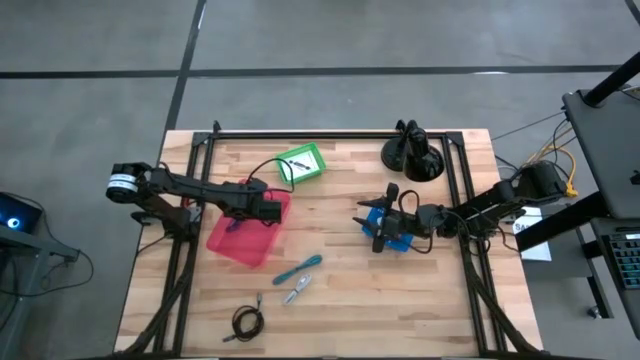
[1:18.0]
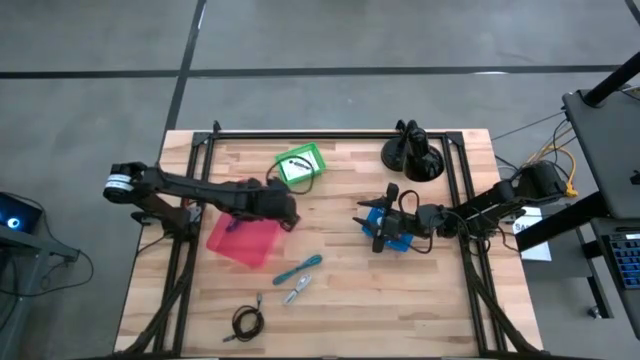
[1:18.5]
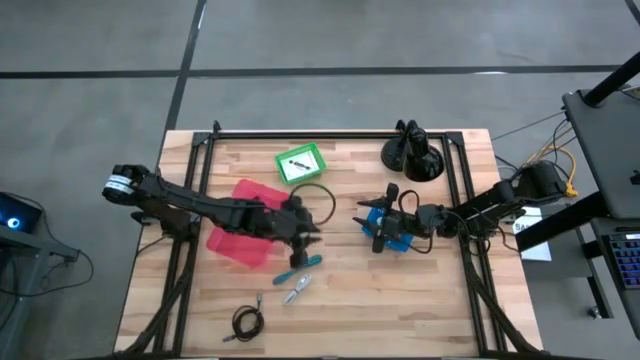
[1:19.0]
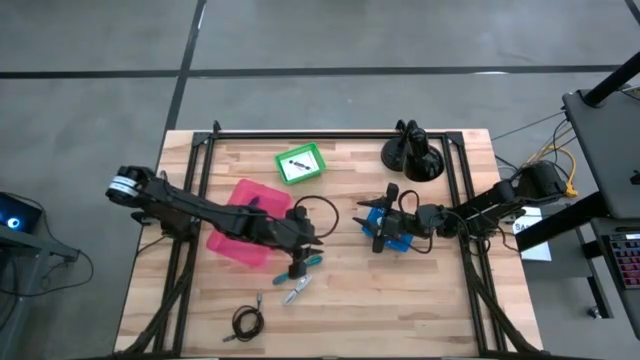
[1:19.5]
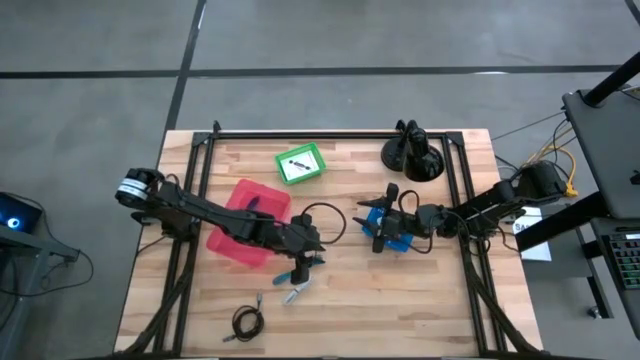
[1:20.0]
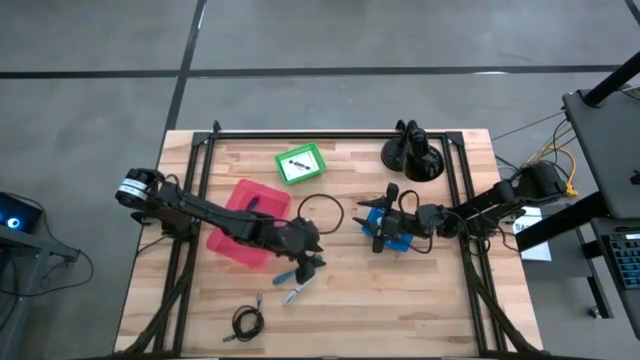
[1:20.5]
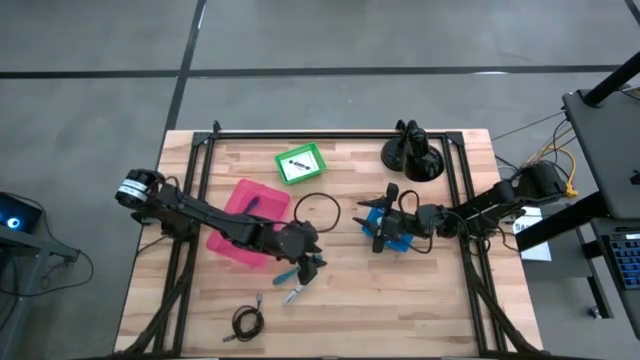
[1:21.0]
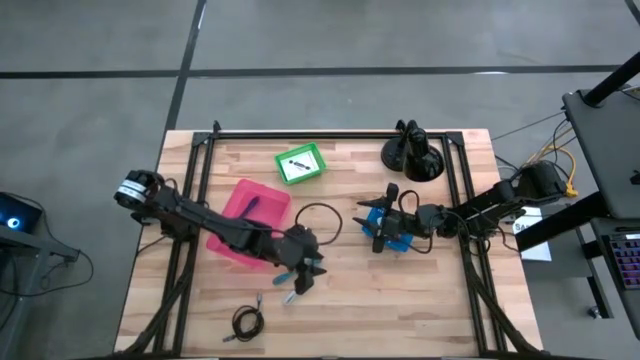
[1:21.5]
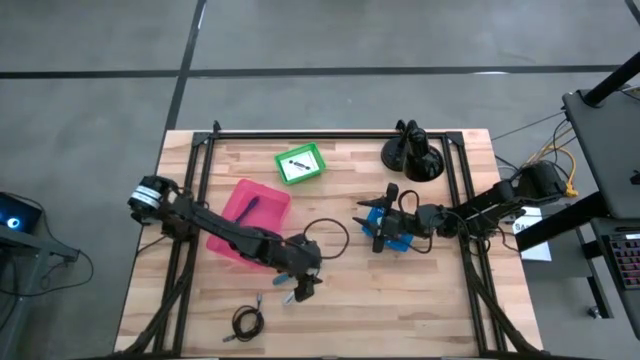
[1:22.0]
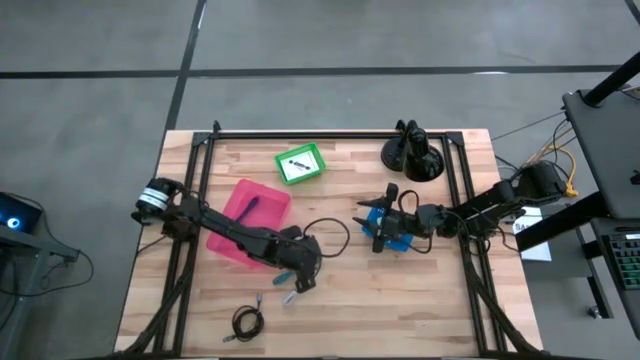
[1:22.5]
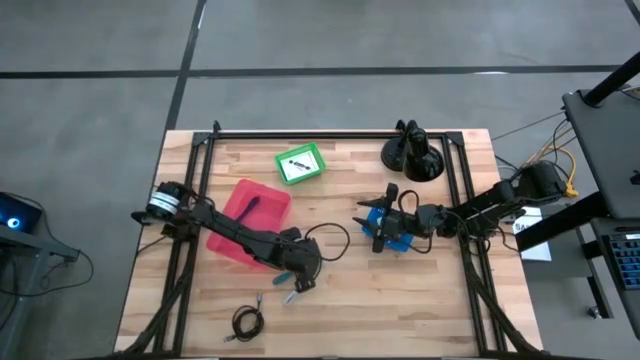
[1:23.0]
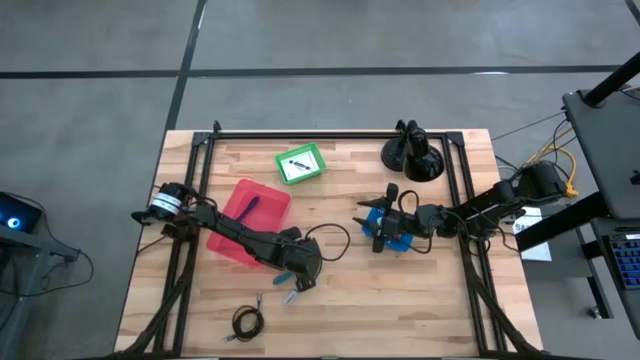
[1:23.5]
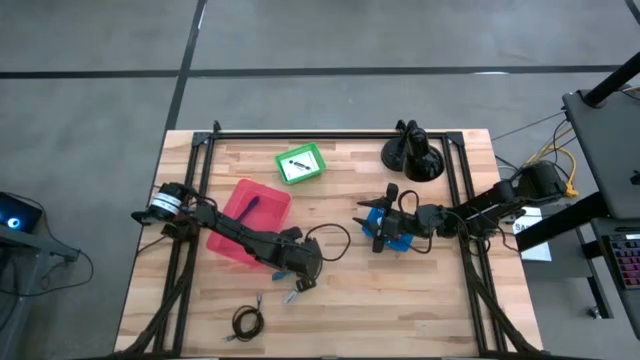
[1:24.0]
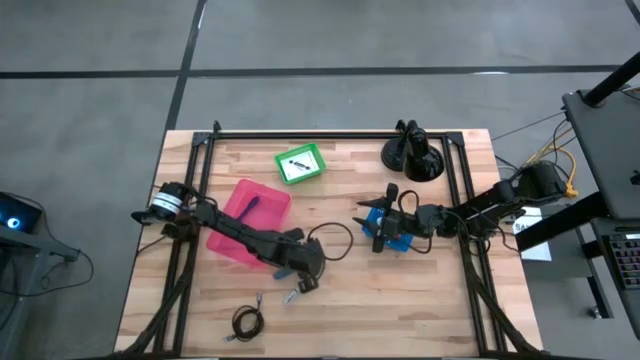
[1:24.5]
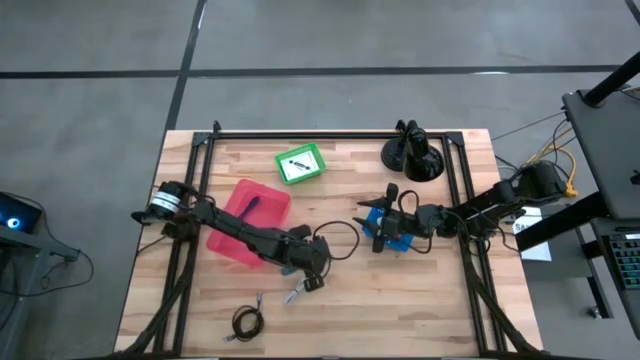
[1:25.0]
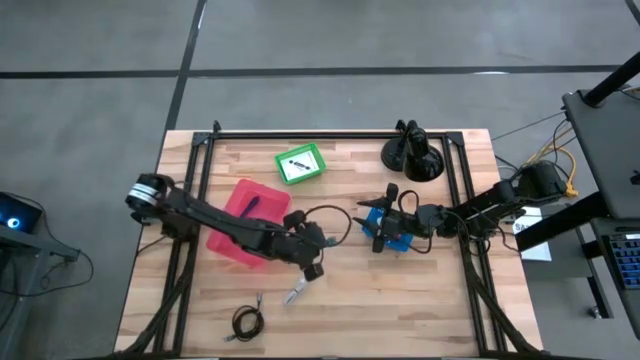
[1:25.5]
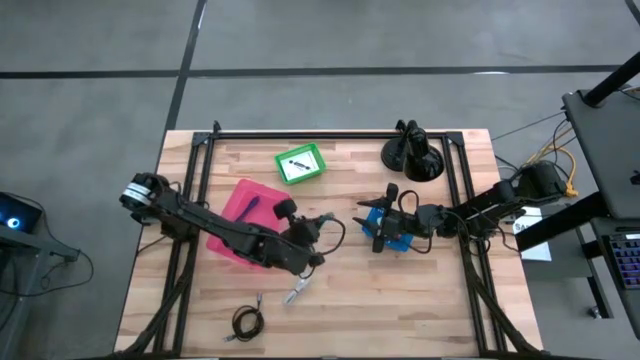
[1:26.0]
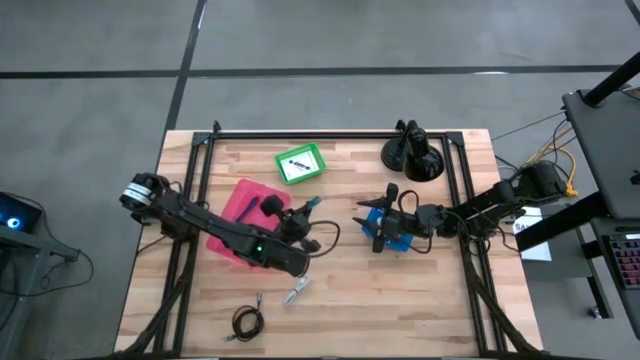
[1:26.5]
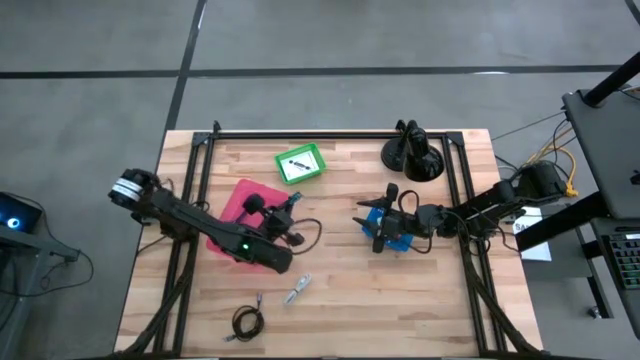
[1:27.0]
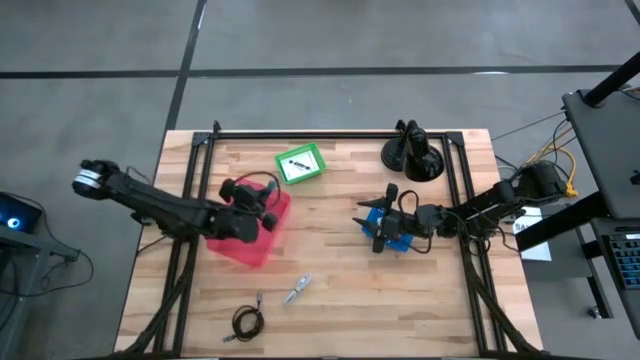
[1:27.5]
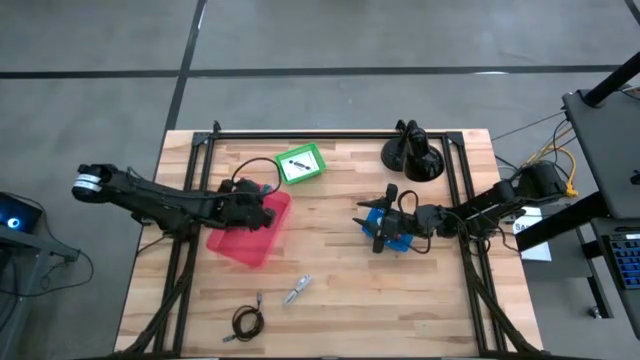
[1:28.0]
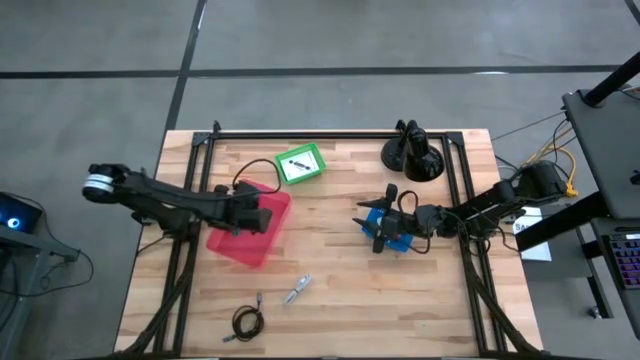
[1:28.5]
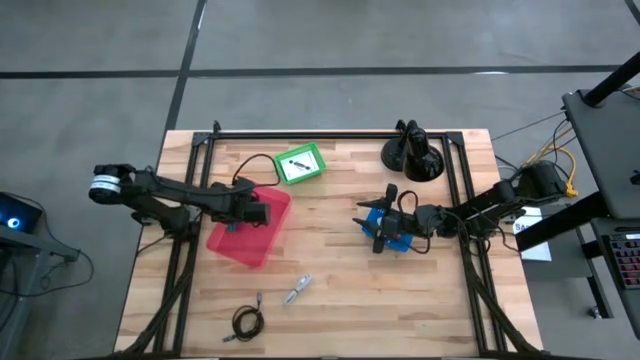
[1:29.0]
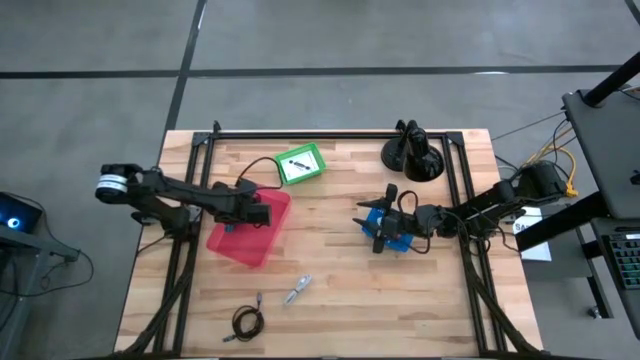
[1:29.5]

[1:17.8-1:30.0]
Task: Pick and place items into bin
Put the blue charger cable into the pink bin

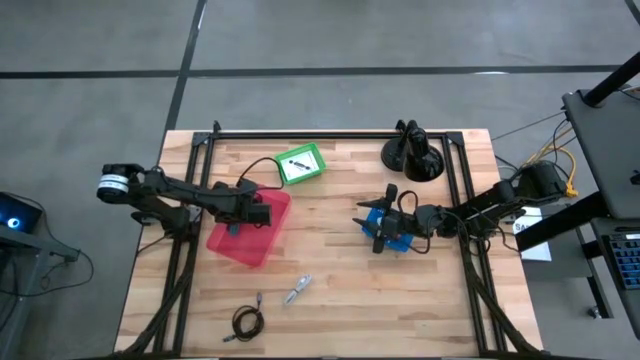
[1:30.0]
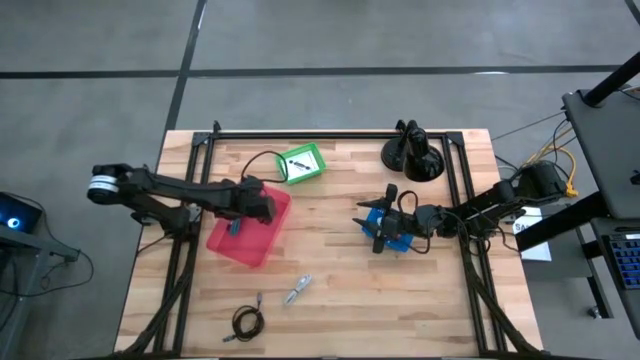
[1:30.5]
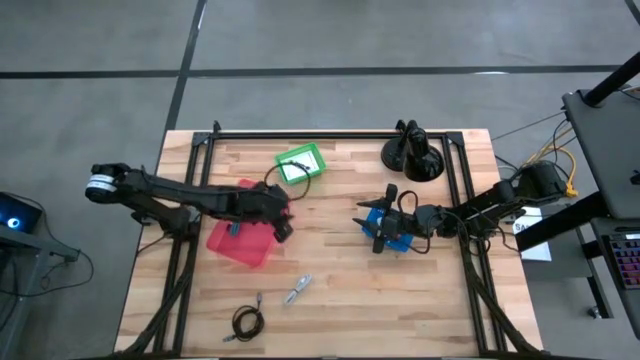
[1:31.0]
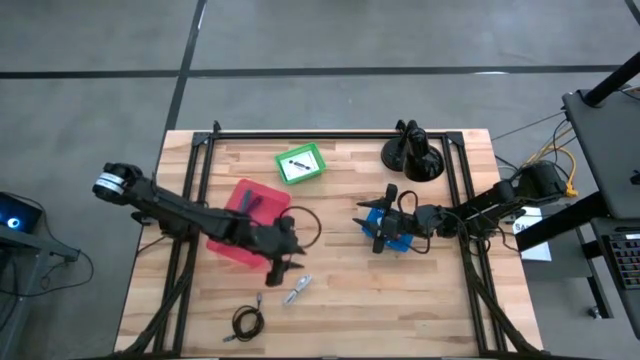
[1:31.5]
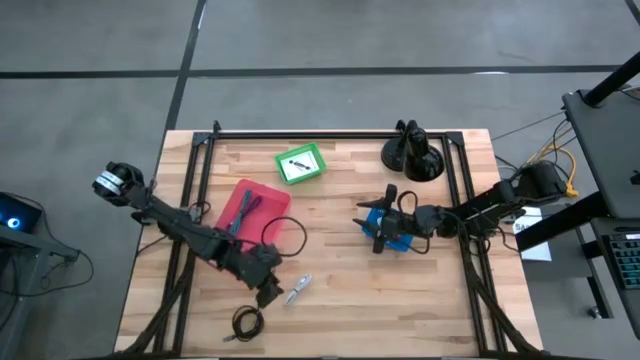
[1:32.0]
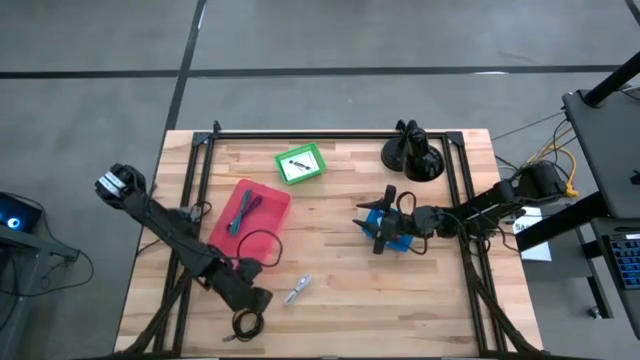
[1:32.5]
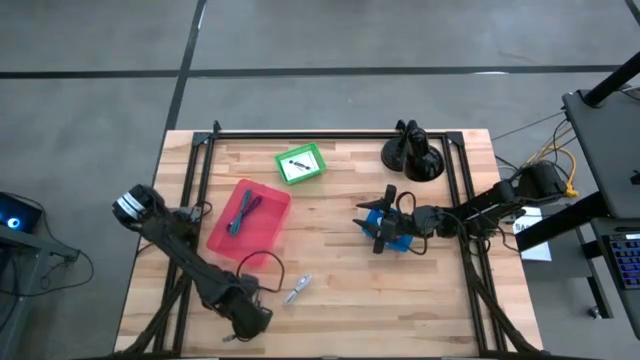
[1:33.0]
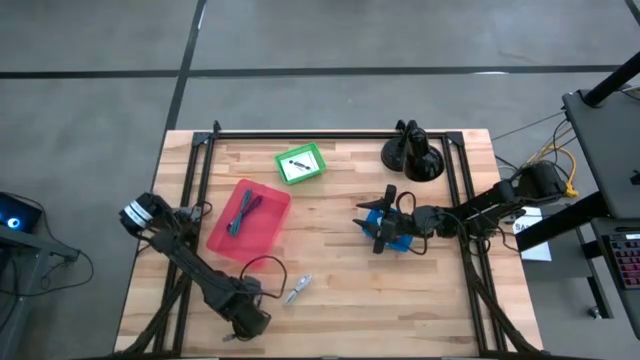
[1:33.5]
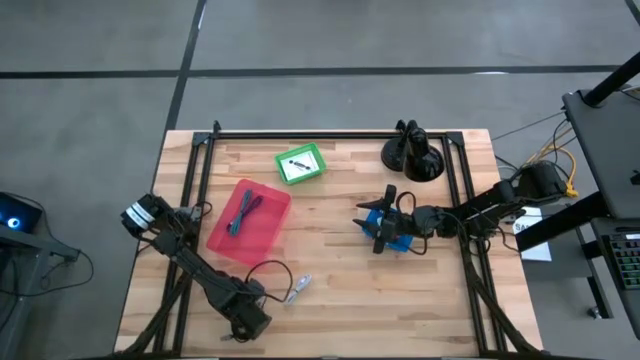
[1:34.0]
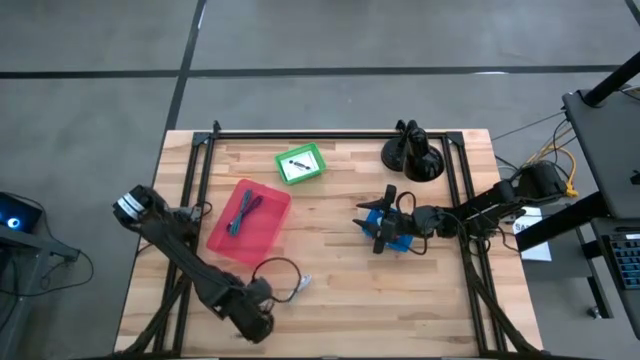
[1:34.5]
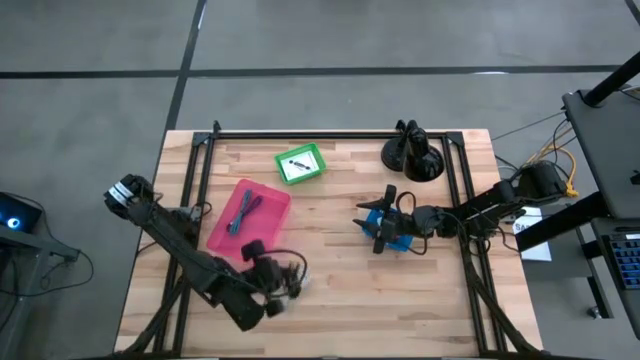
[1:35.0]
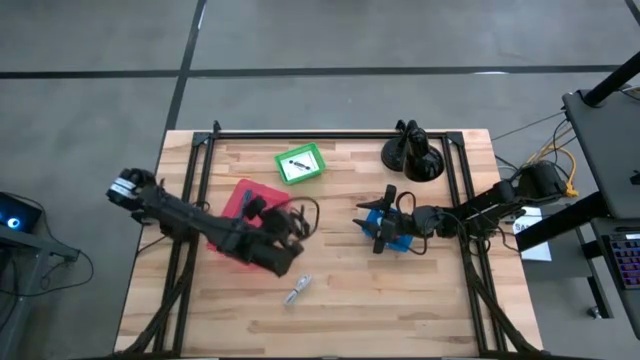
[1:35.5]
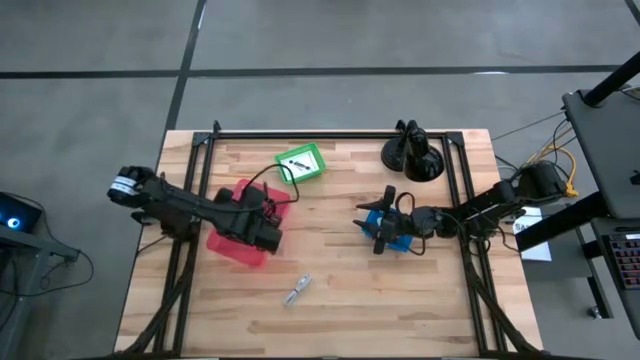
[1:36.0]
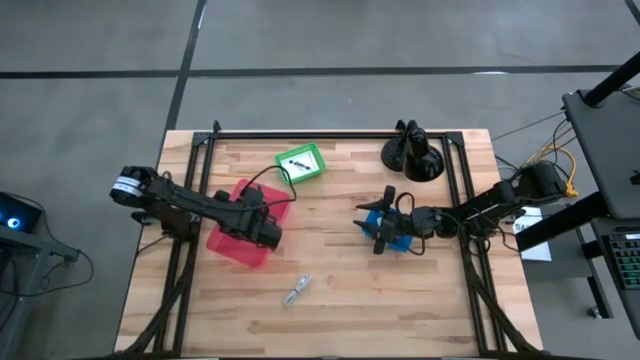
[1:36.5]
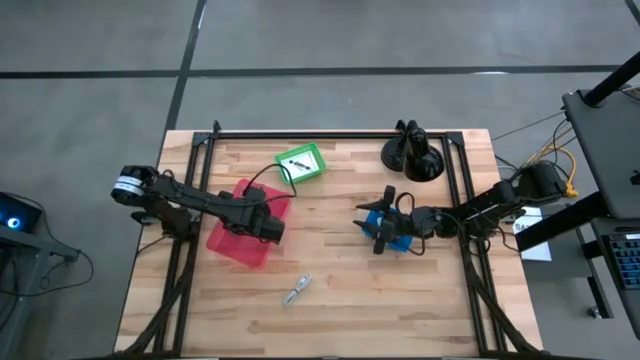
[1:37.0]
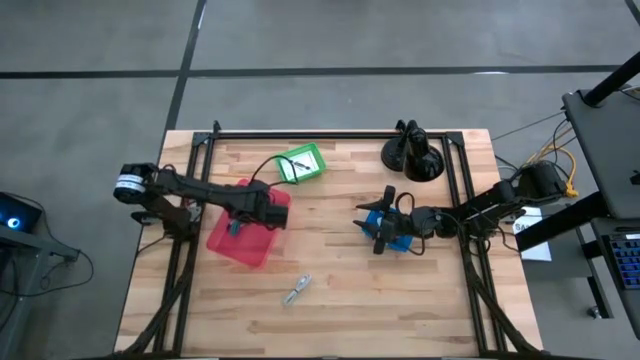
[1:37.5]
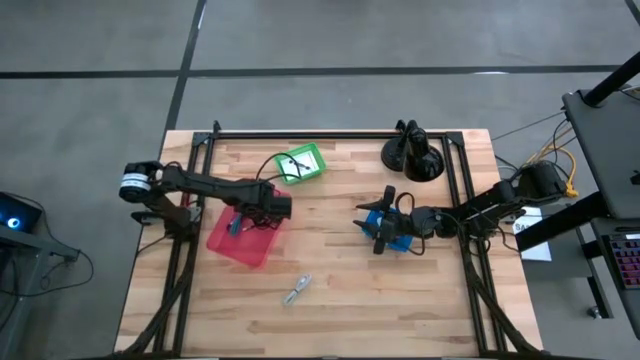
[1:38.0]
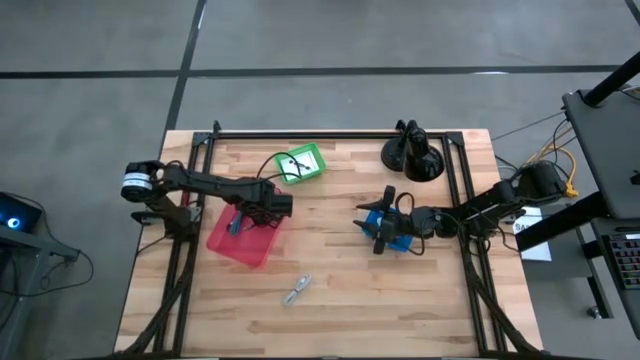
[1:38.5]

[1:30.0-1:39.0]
Put the black charger cable into the pink bin
